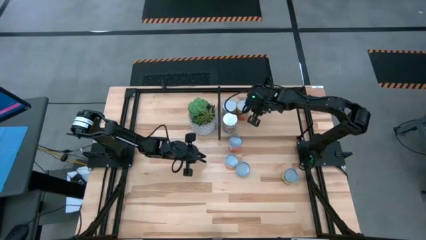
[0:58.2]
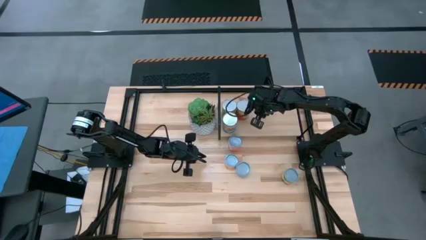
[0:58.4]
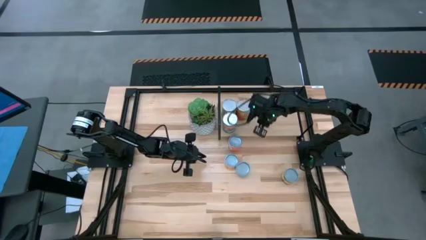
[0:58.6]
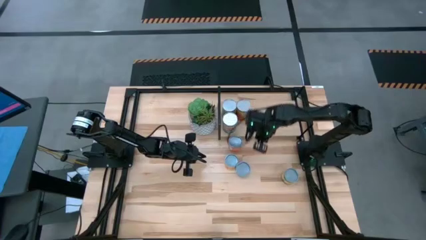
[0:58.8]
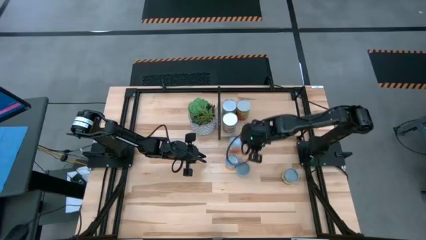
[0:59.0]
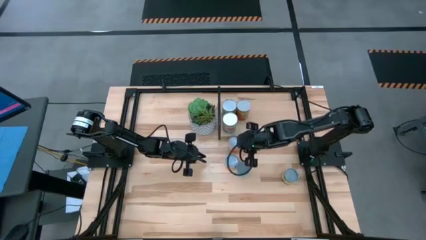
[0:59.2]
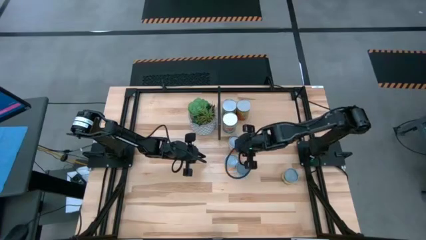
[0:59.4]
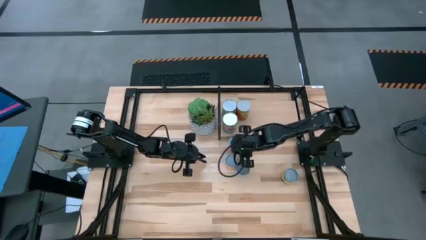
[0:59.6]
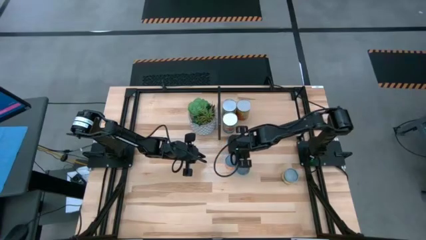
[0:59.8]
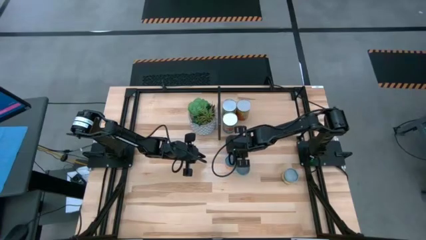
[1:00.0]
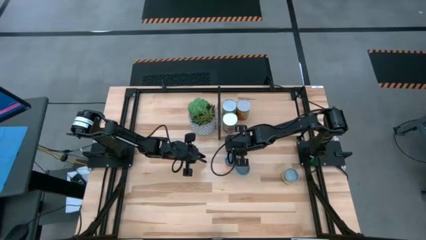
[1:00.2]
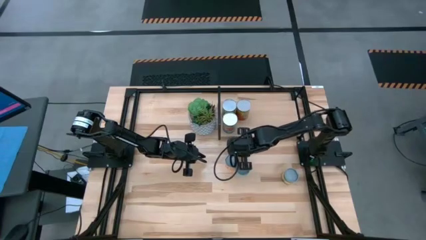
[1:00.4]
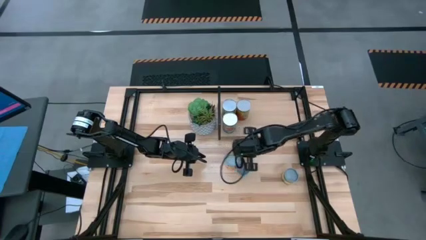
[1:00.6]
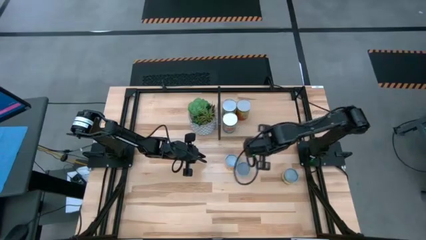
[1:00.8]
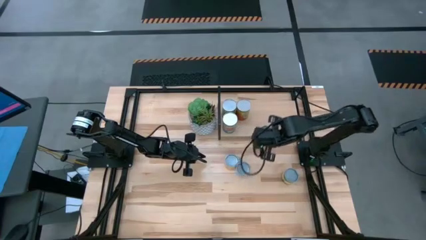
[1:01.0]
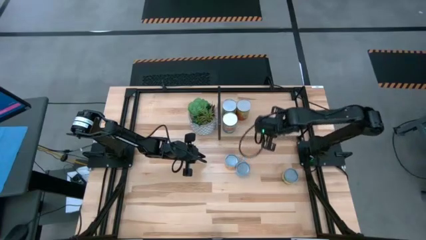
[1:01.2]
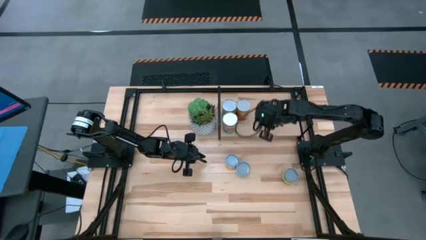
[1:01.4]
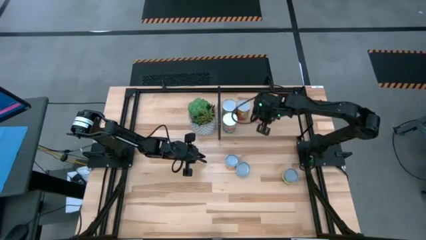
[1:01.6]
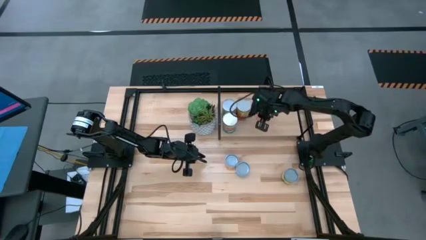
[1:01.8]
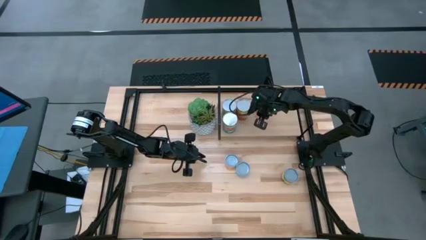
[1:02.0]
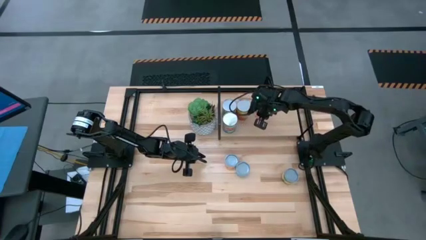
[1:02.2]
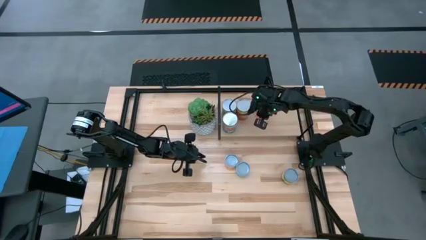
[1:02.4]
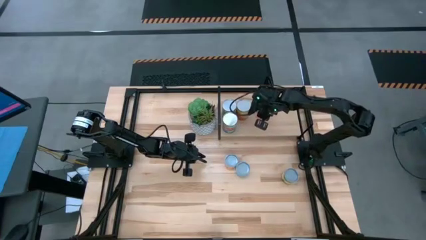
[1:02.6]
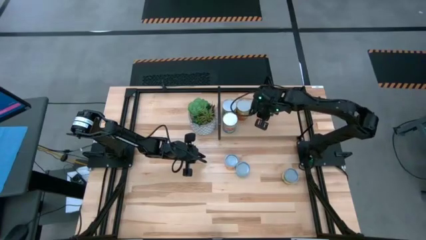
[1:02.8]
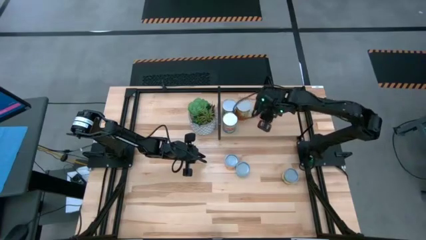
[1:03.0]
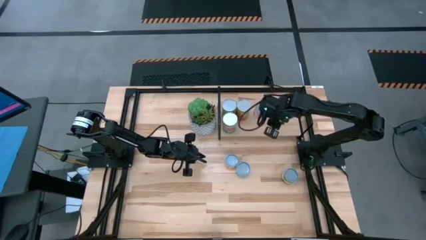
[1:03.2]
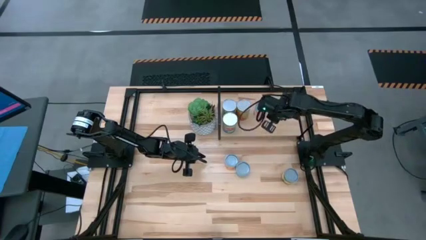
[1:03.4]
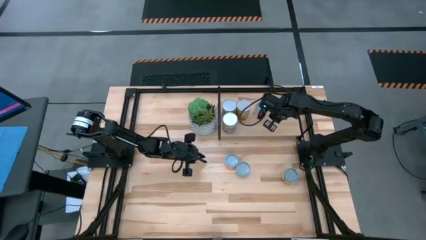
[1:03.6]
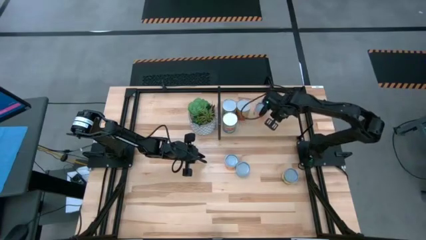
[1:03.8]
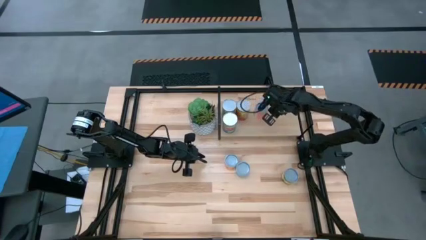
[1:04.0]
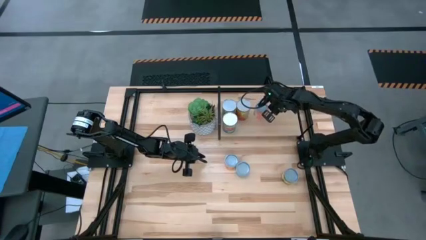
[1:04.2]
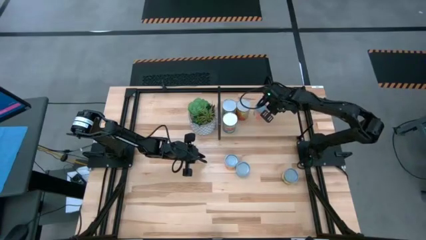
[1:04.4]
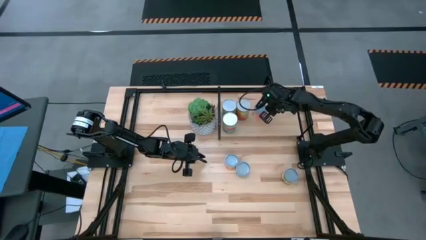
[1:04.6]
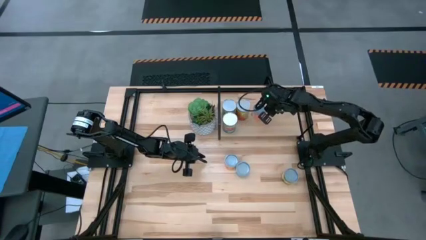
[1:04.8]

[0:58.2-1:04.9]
Task: Pick and place cans onto a shelf
Put the canned meatballs on the shelf

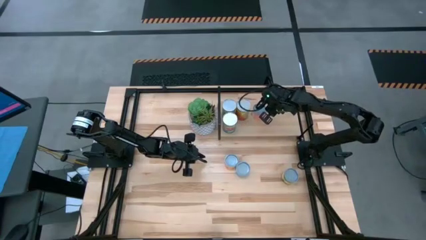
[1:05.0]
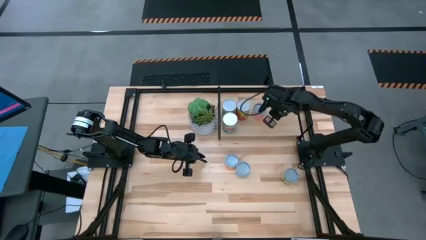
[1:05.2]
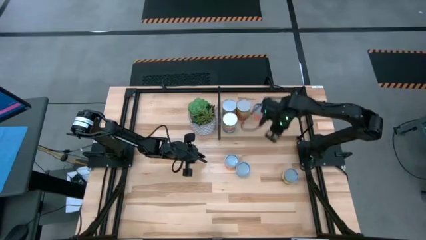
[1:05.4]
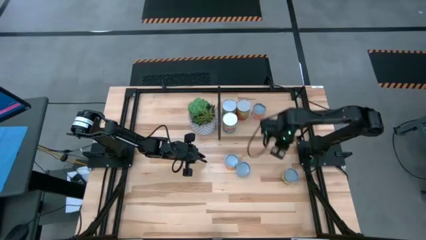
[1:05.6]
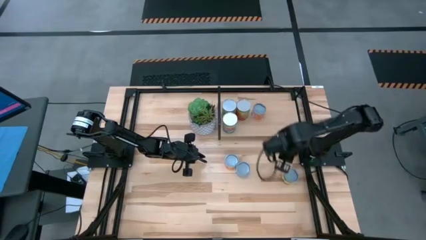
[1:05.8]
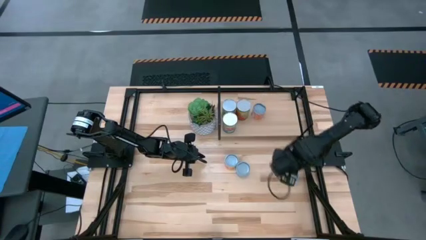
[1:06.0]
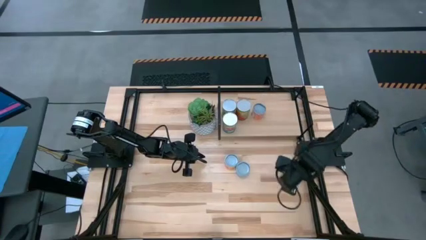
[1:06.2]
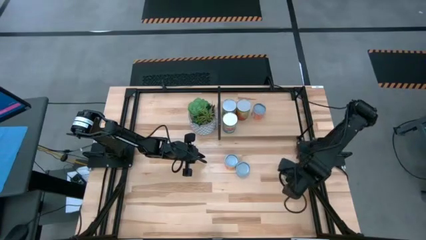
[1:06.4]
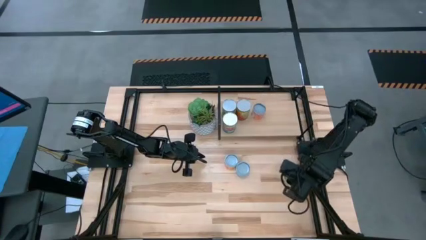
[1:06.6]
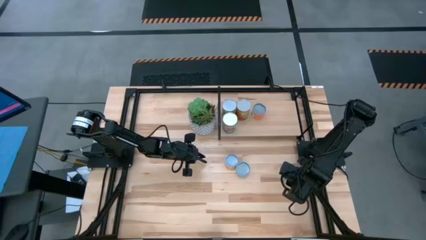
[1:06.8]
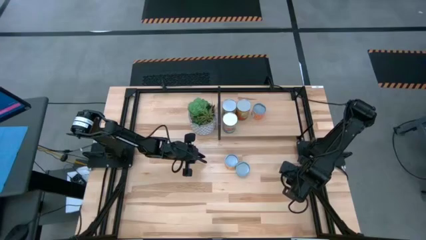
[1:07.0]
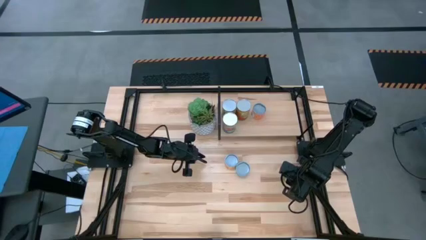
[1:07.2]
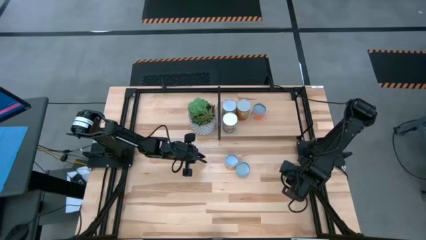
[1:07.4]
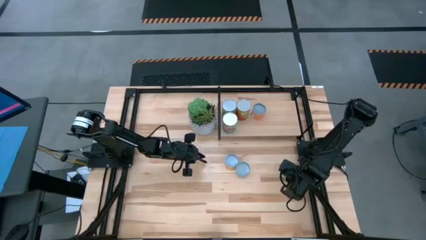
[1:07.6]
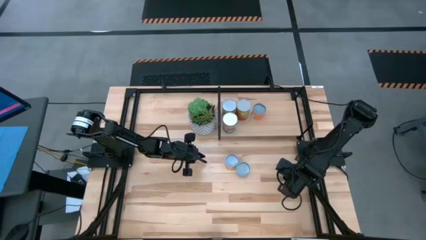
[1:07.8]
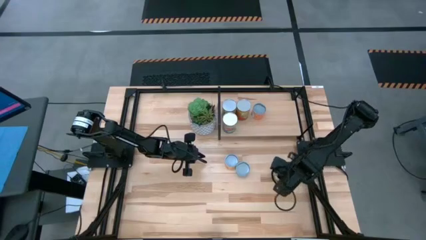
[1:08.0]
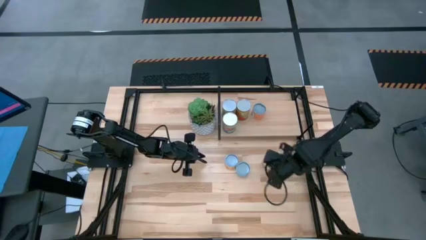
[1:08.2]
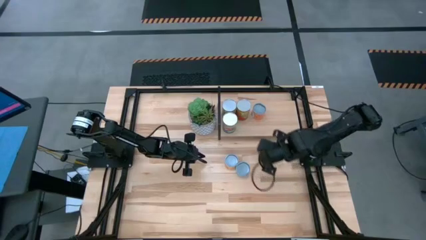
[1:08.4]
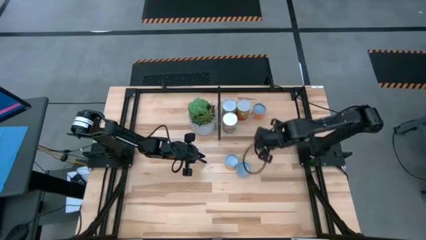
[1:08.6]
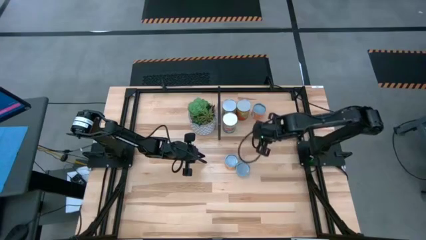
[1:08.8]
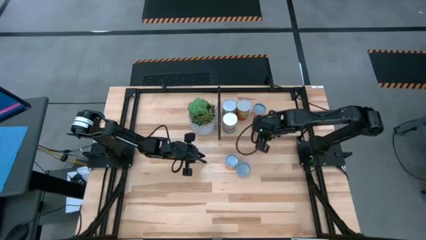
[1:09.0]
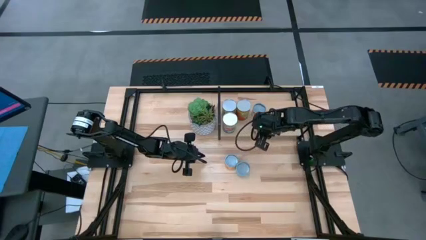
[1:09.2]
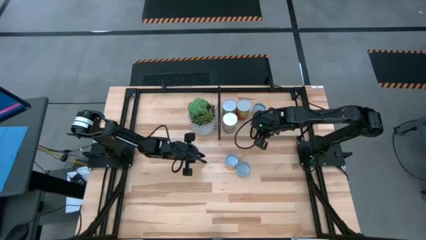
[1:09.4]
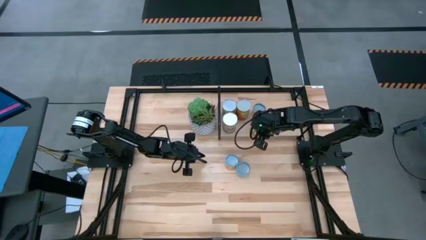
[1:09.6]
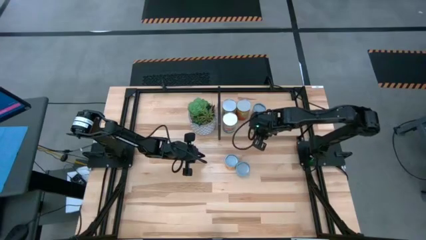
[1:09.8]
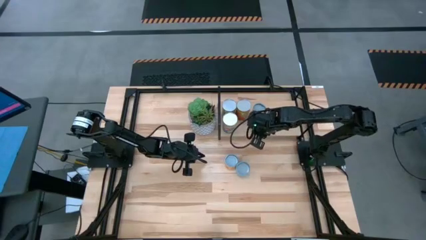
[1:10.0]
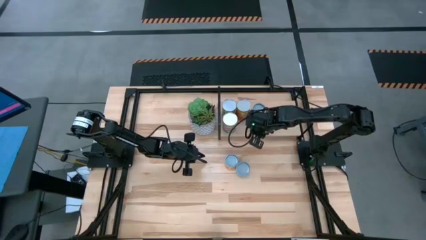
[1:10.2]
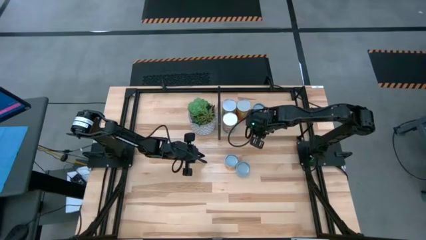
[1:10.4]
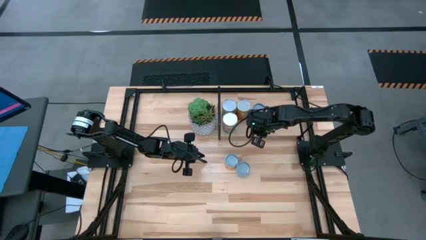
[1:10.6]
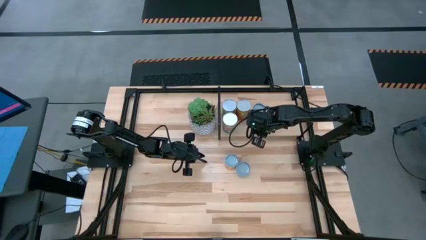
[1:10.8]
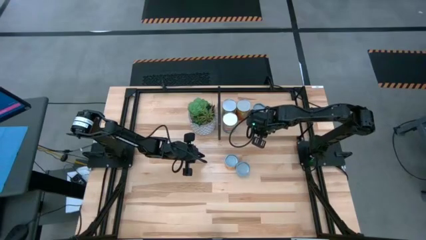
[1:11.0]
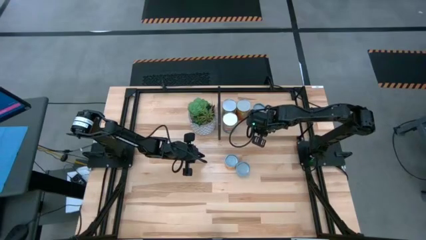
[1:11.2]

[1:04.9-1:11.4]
Put the canned peaches on the shelf

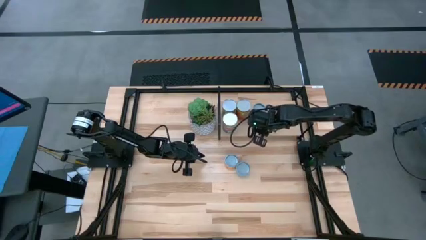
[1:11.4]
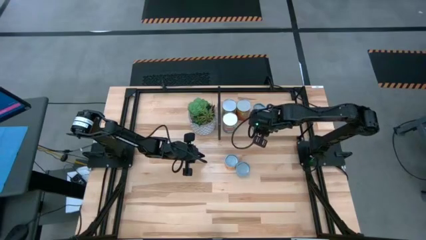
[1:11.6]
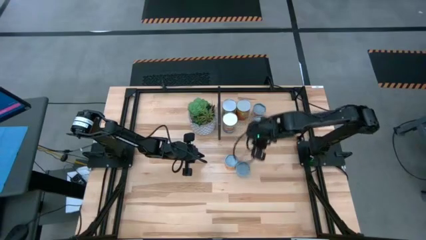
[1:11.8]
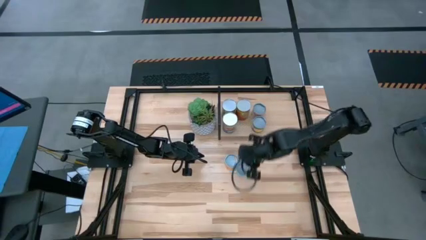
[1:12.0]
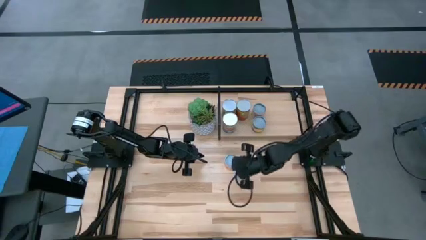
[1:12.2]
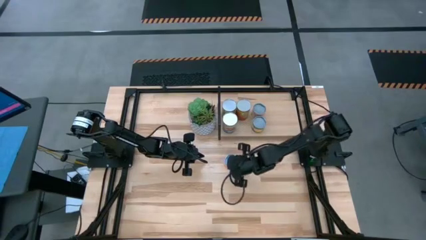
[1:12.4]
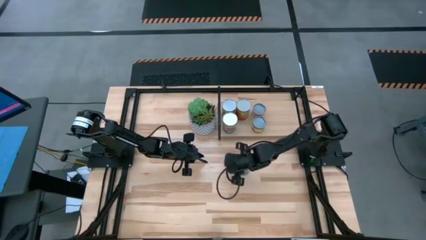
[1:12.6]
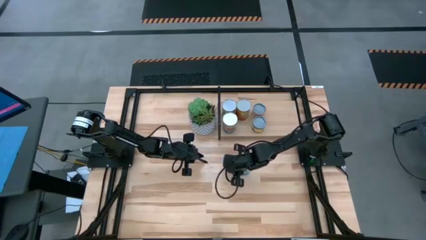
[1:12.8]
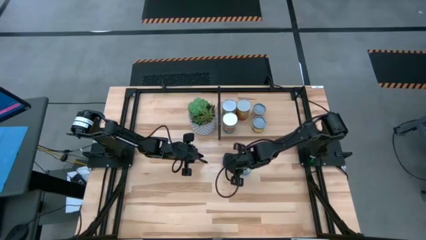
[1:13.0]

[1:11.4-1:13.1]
Put the canned pineapple rings on the shelf

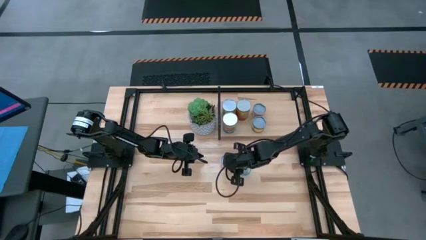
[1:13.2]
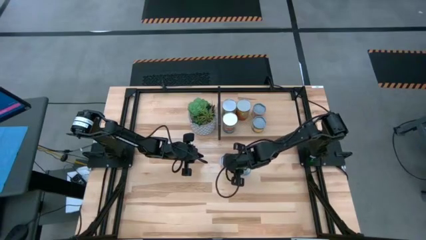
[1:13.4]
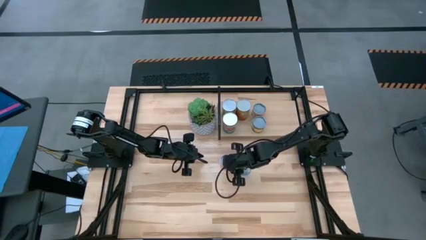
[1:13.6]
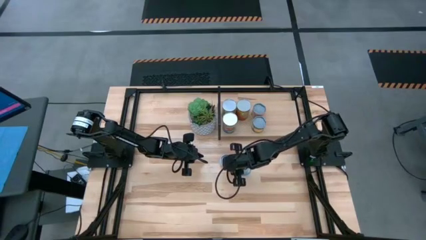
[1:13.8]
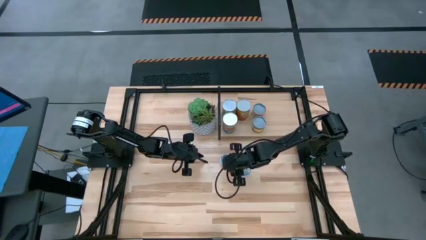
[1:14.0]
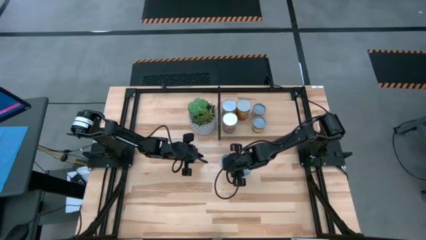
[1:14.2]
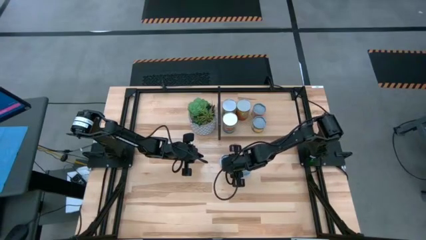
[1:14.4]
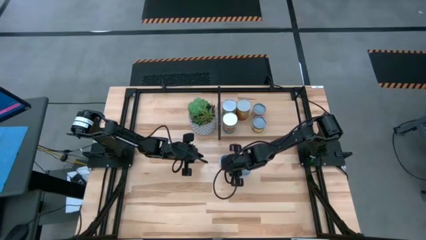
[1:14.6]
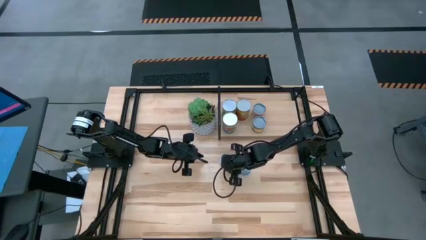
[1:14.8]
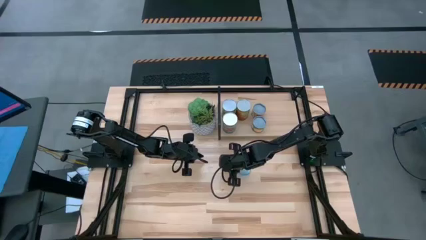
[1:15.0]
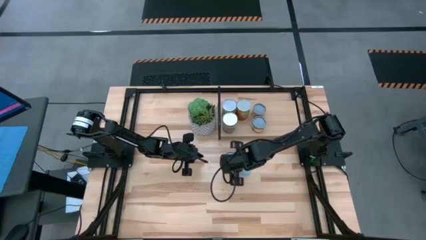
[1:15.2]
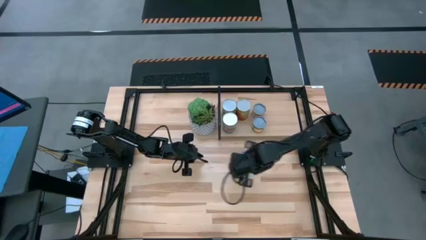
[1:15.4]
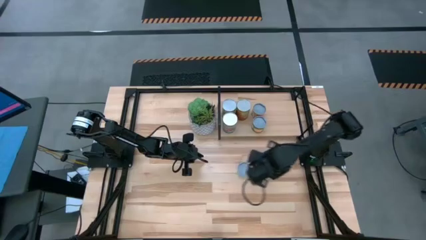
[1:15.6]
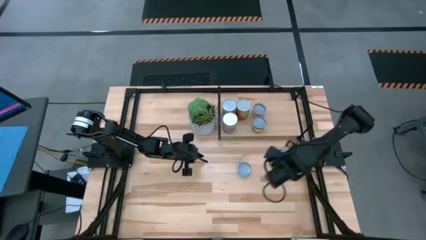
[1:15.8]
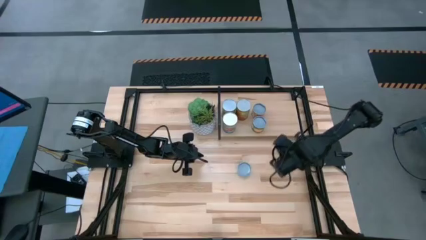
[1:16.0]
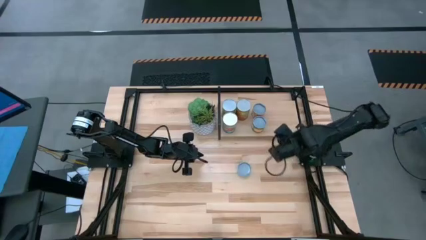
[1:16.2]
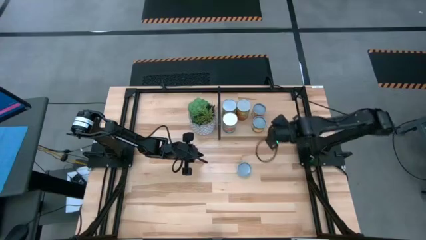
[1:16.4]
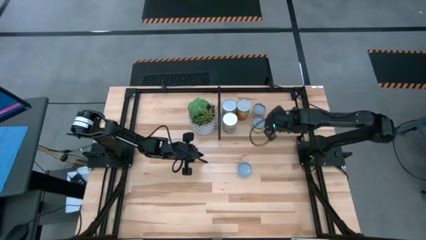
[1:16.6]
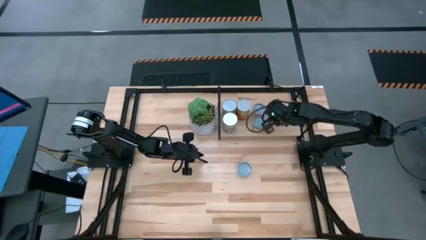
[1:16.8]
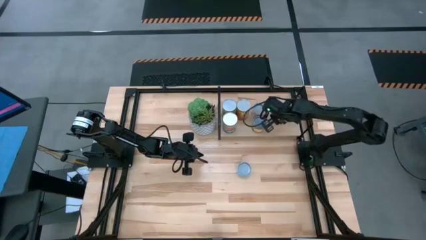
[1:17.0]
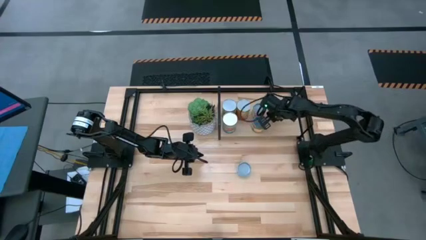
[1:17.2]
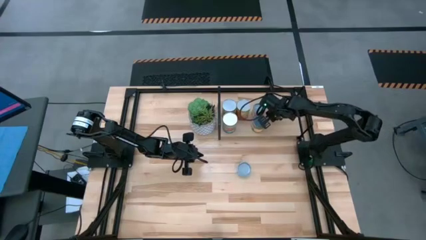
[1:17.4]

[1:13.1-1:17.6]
Put the canned pineapple rings on the shelf
